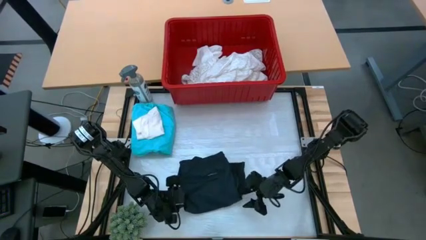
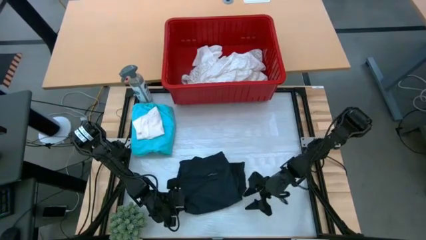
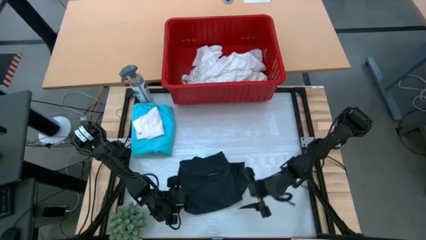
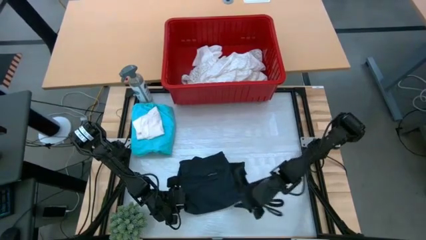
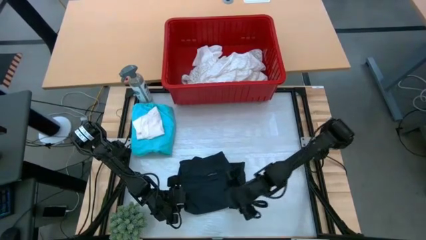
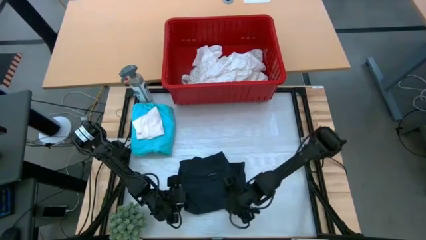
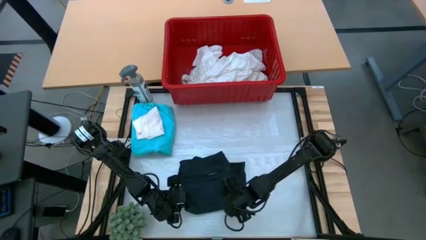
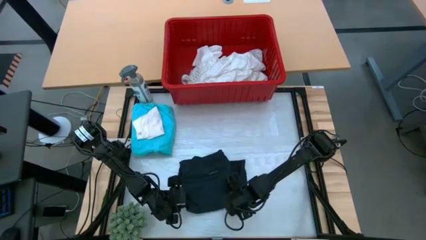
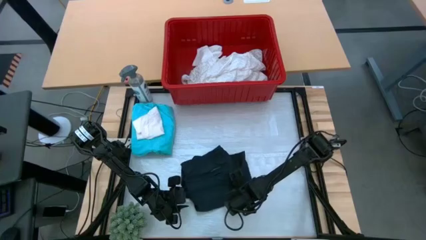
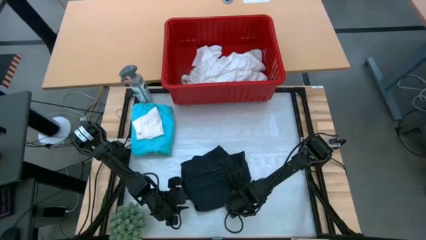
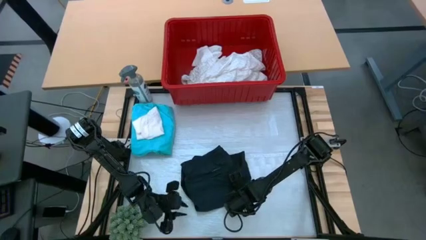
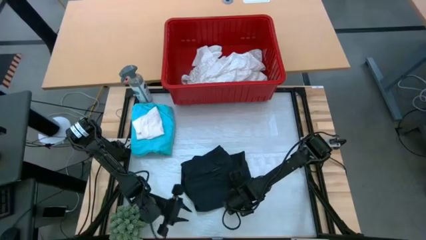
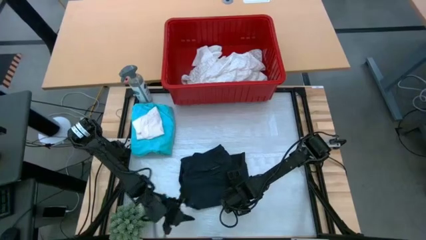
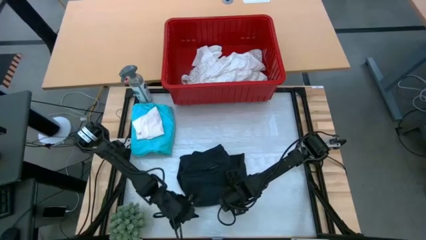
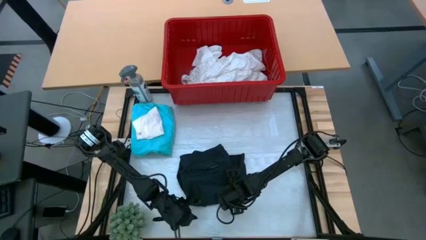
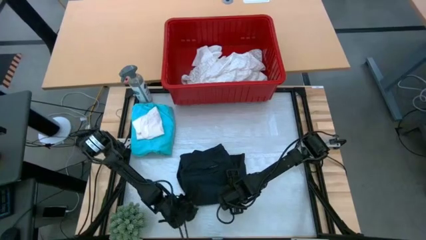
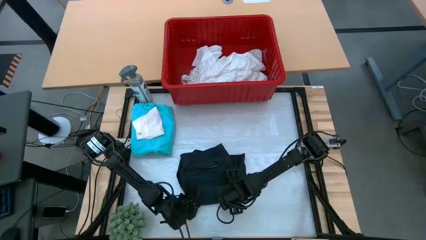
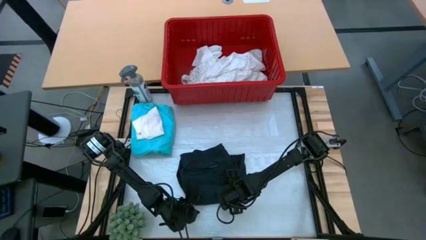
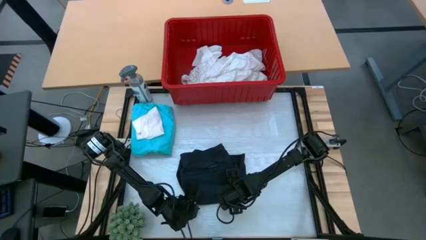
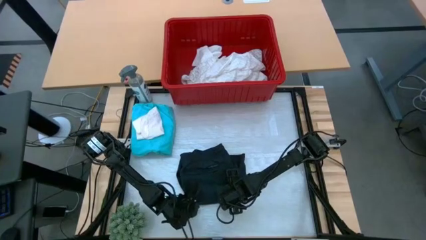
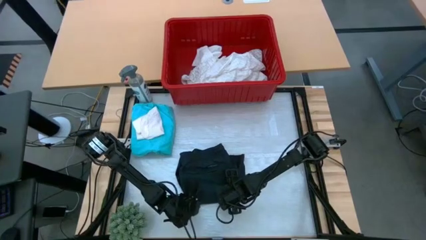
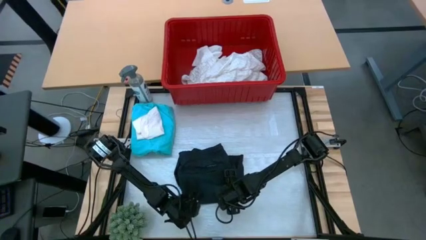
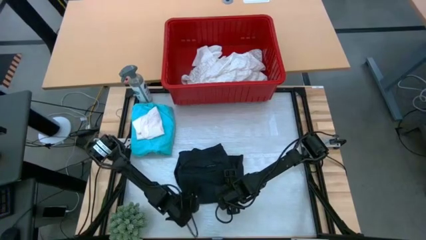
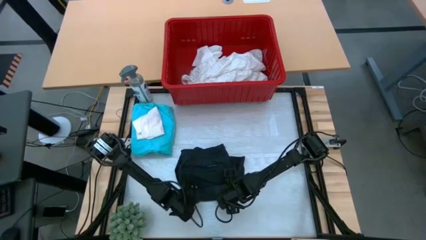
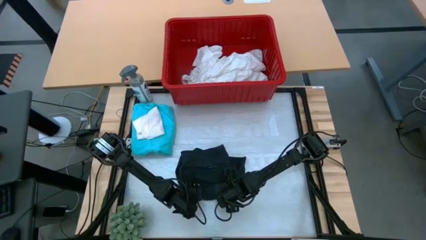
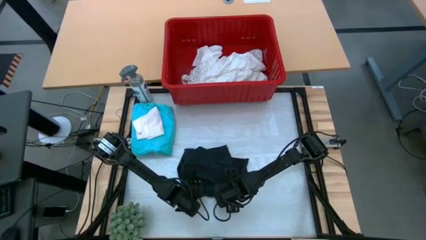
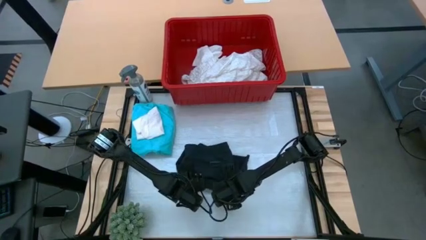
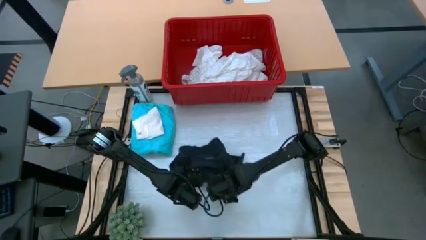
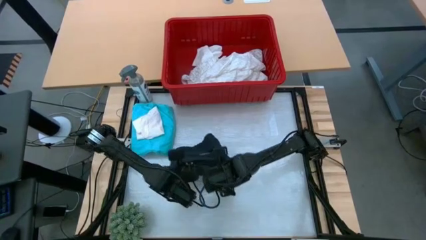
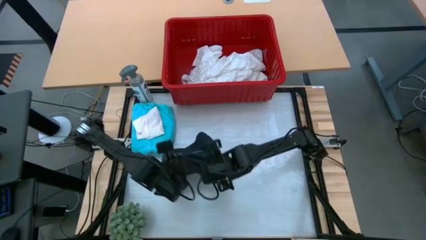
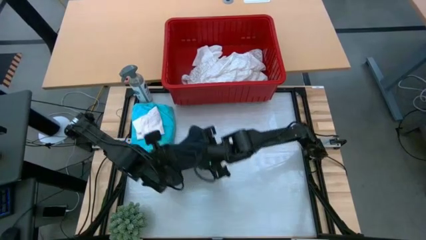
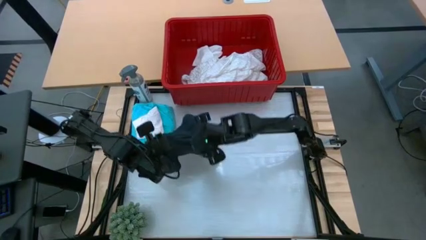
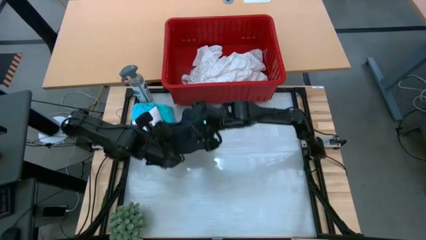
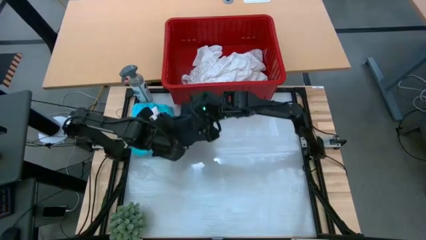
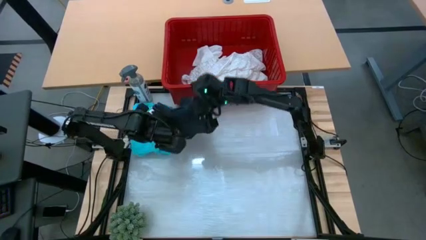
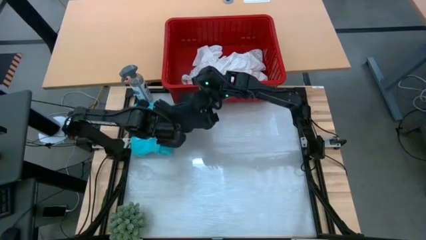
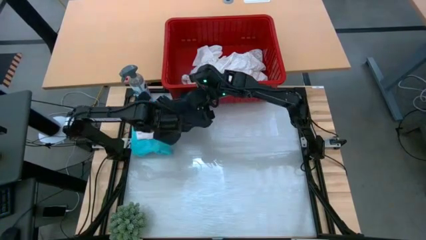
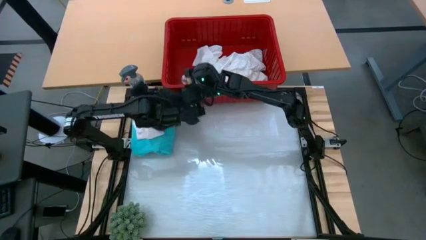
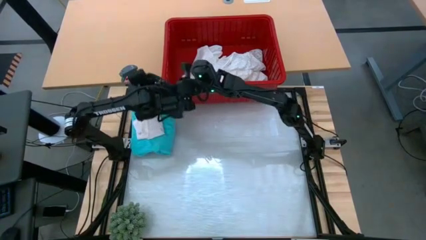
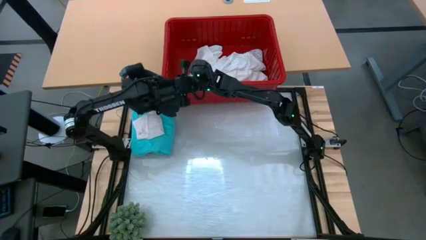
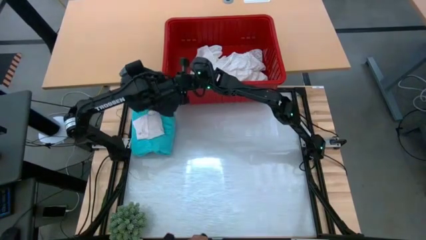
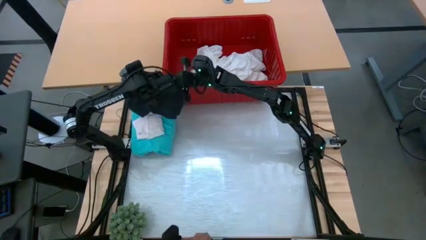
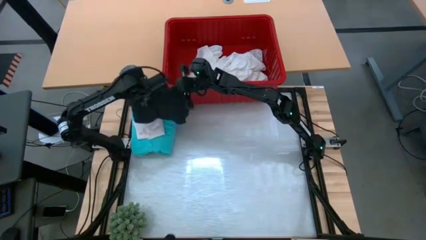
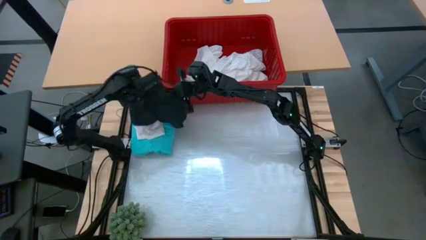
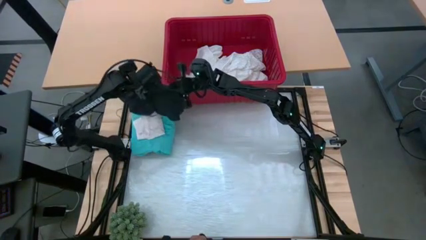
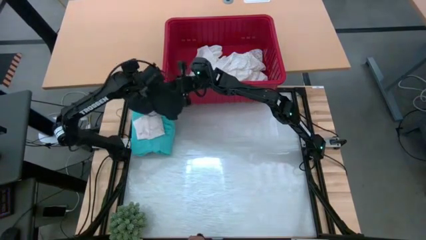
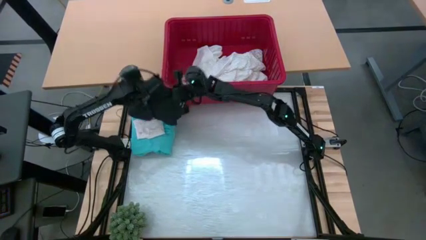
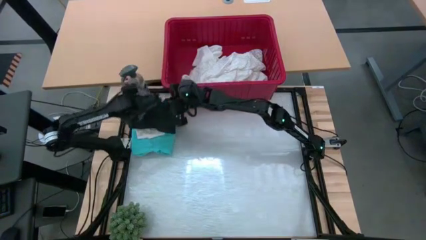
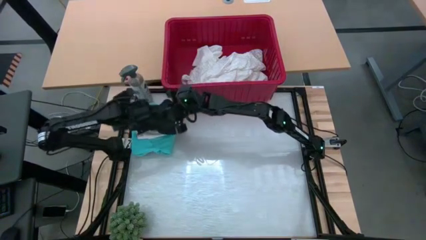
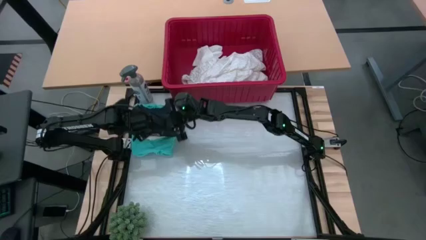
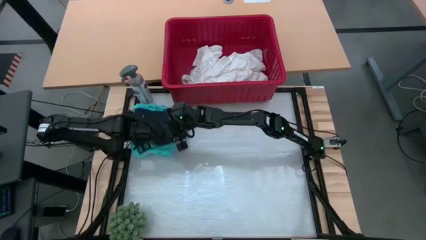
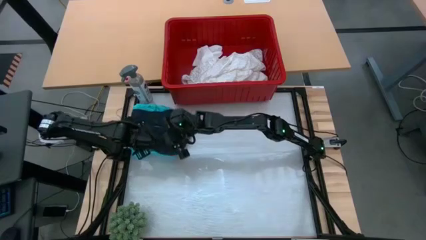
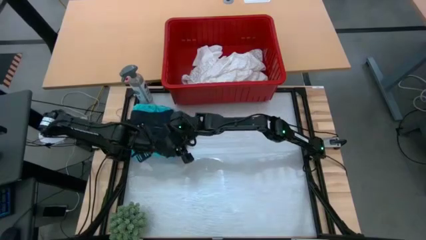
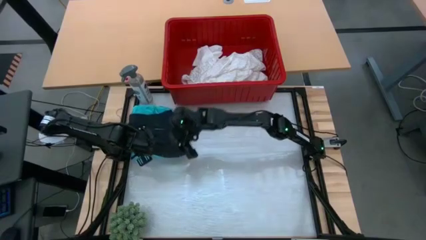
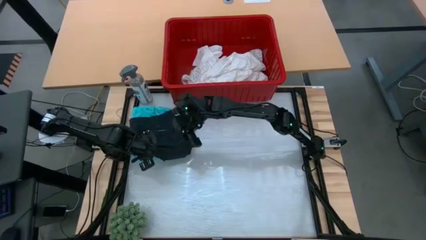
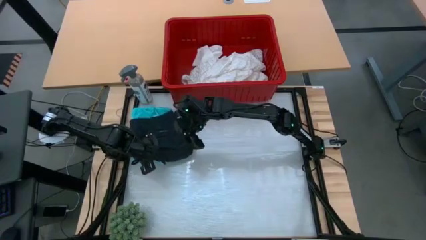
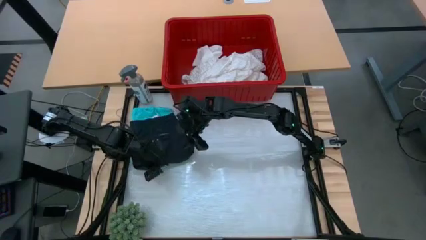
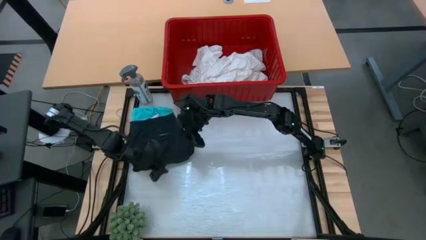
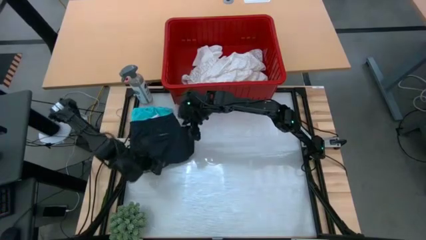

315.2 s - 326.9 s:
Task: Fold laundry
Stack the folded black shorts on top of the folded white underwear

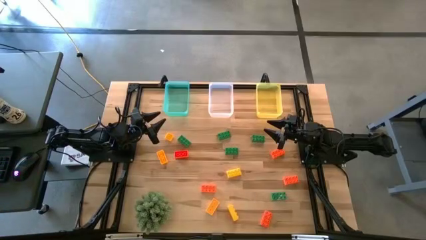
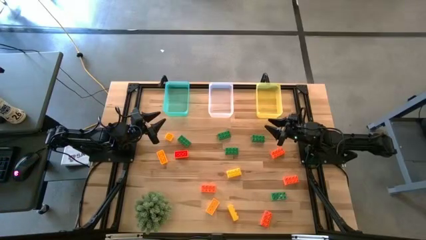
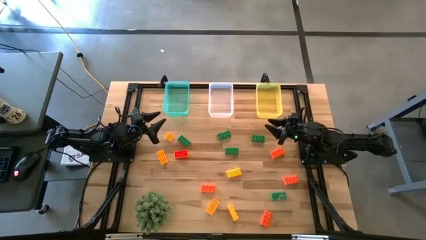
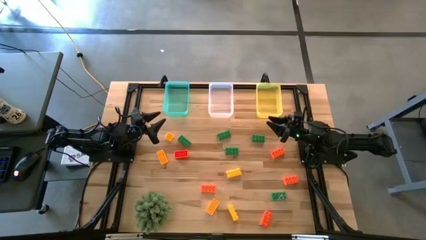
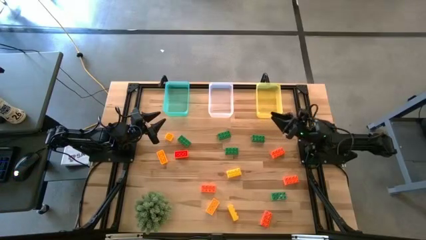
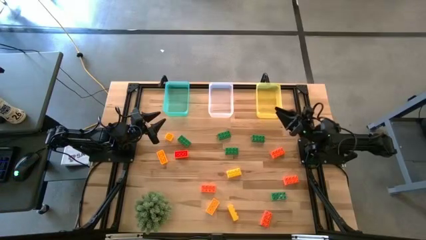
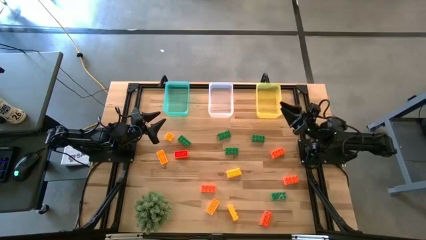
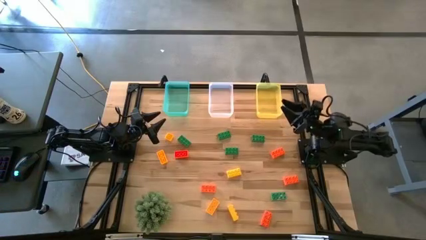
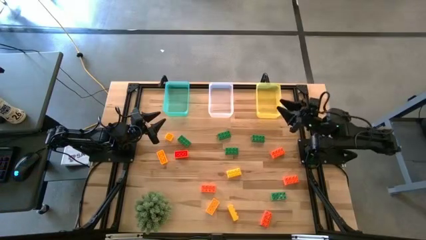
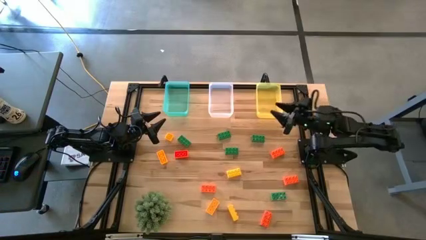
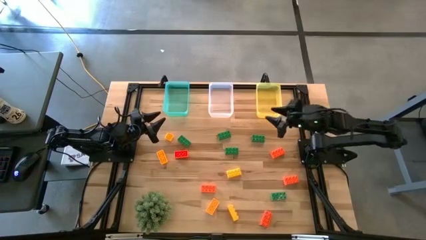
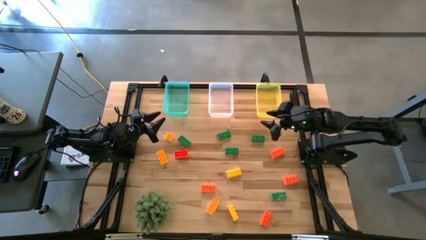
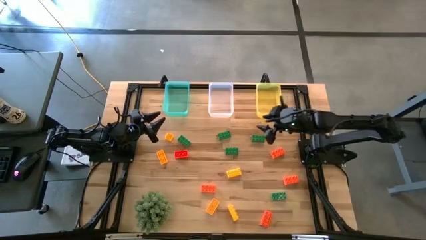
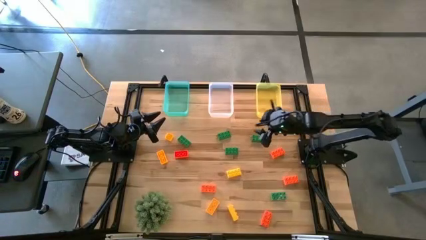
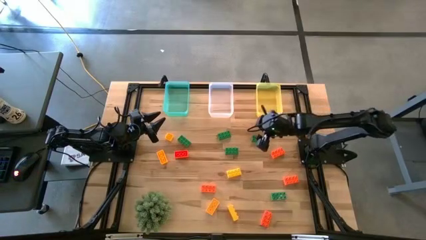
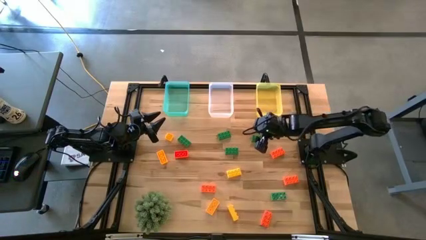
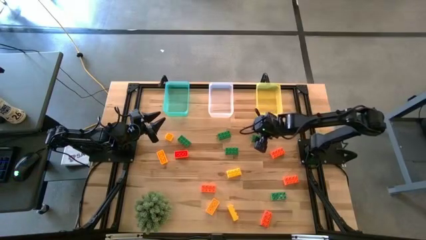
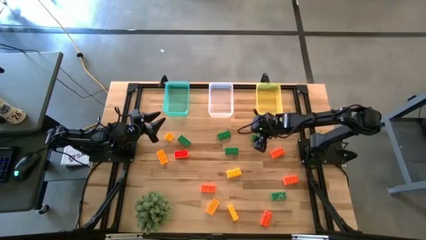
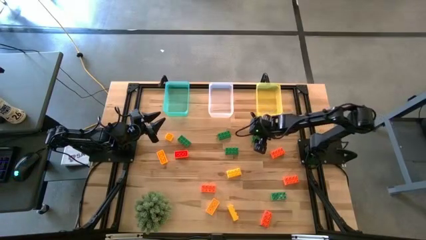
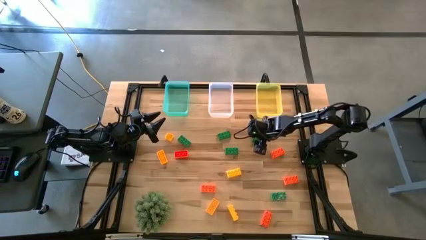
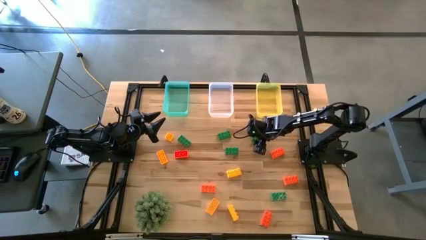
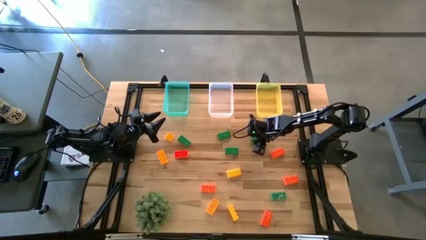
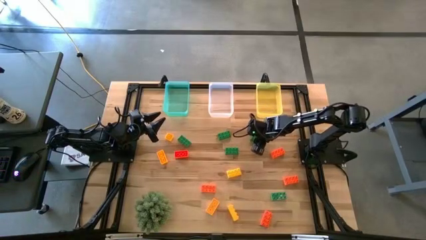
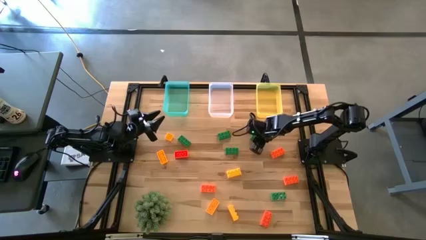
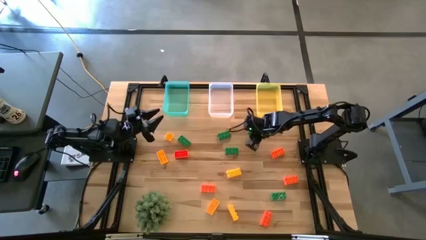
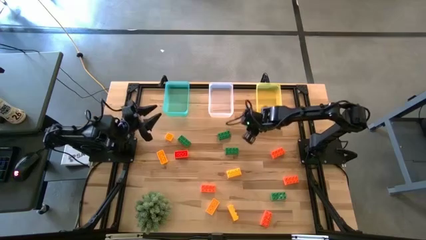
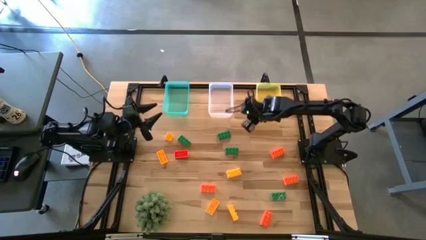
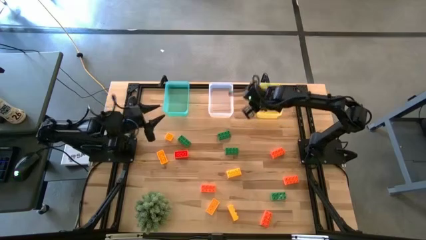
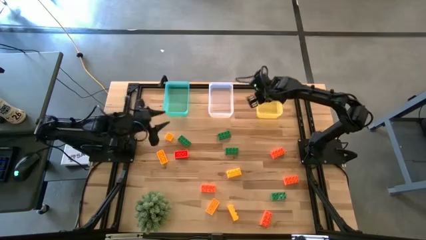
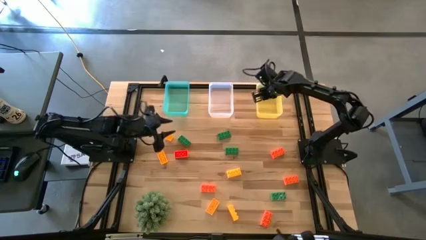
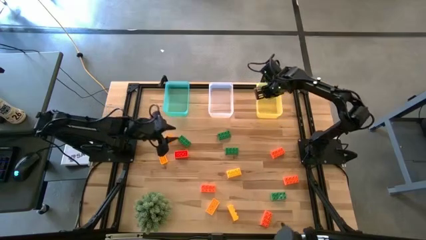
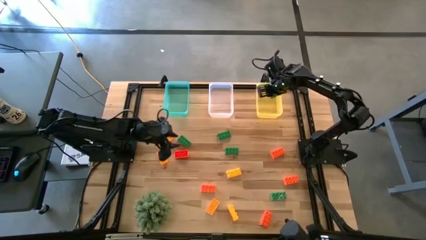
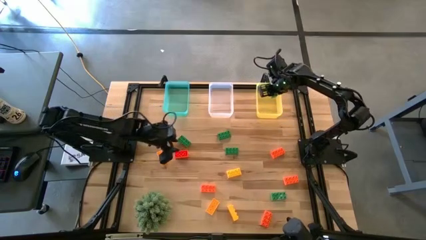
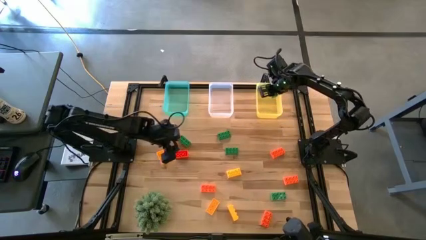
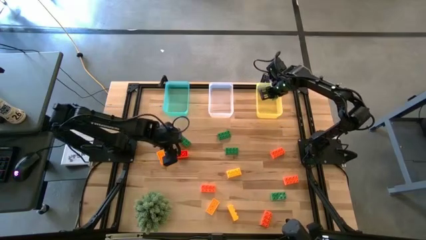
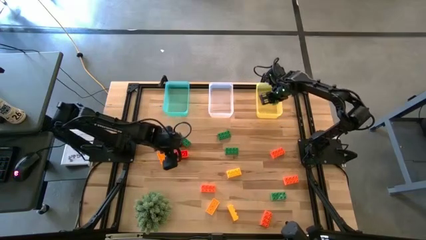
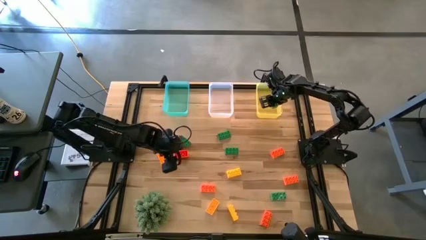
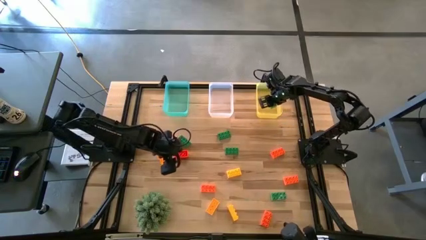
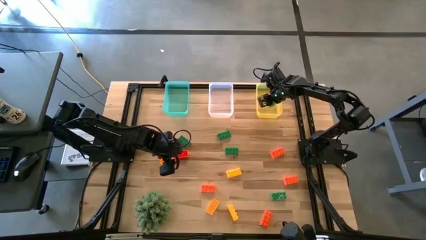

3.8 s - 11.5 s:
Task: Sort & place blocks by color
Put the green game piece into the yellow bin
